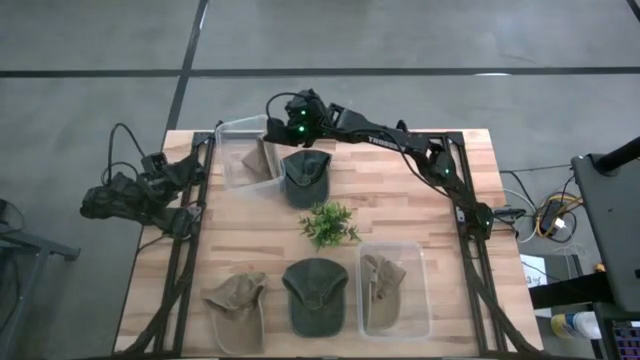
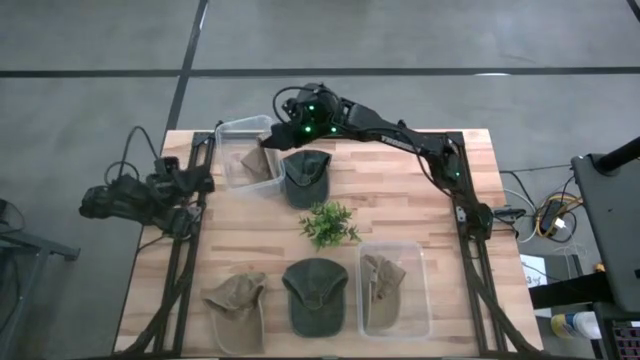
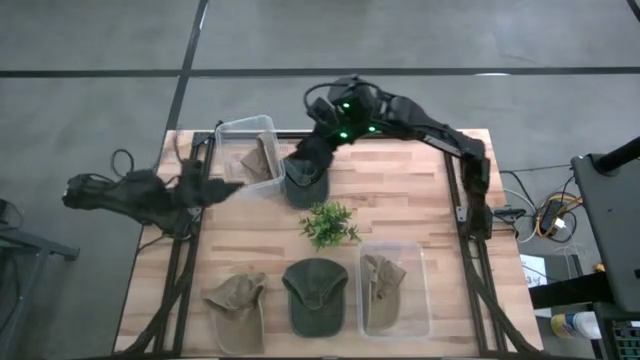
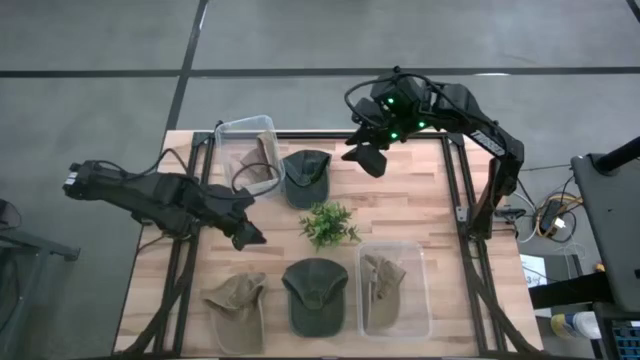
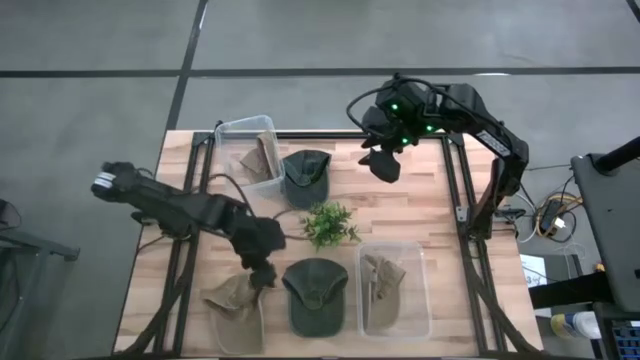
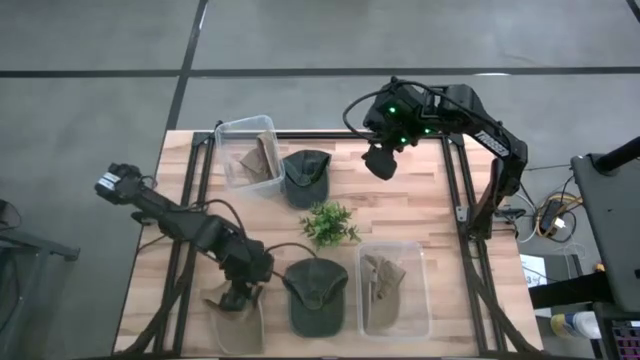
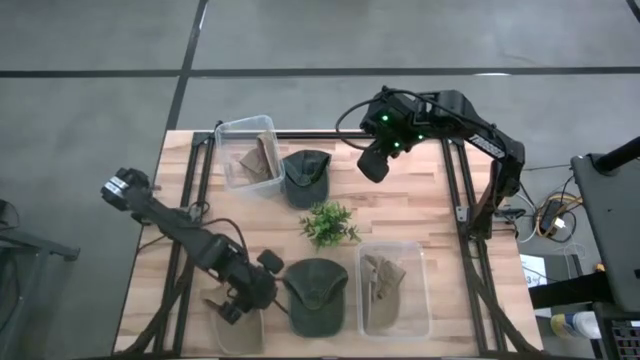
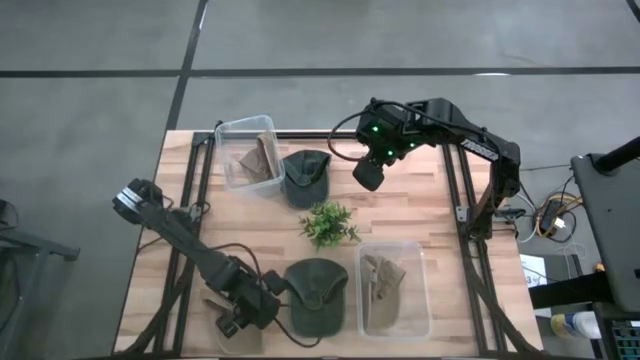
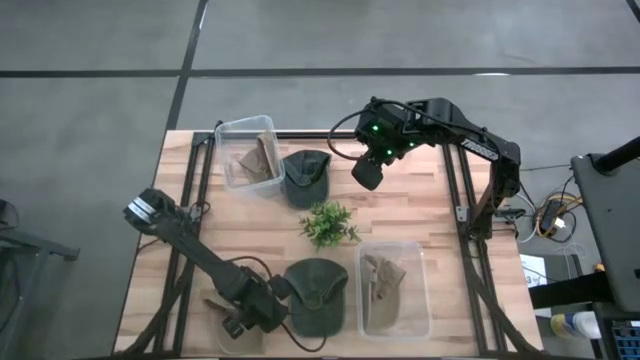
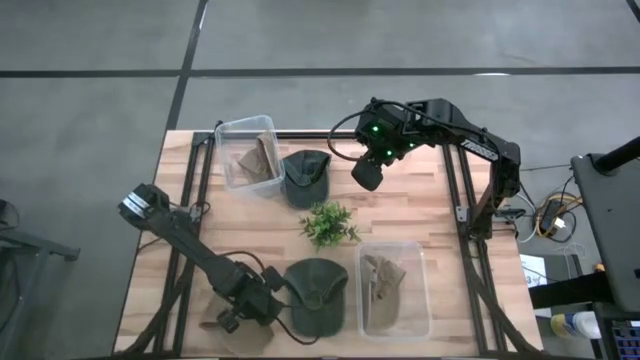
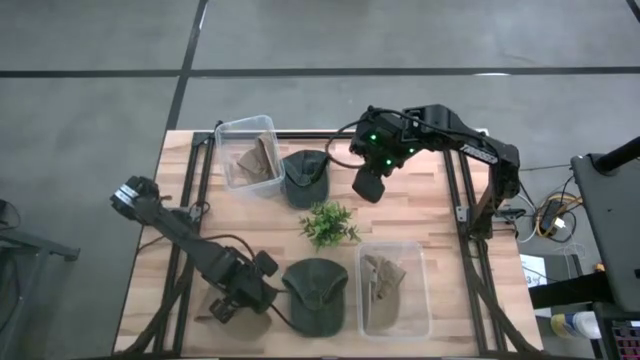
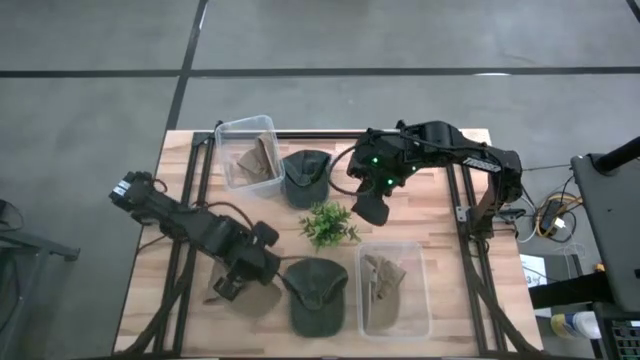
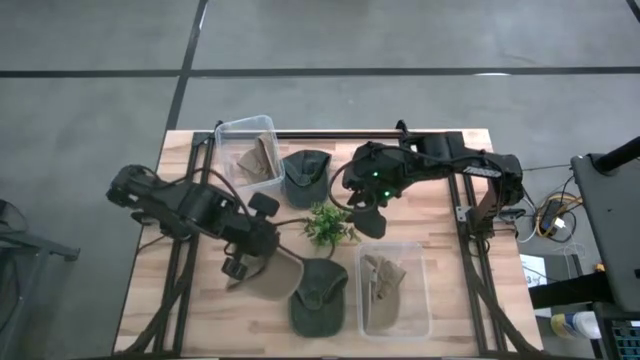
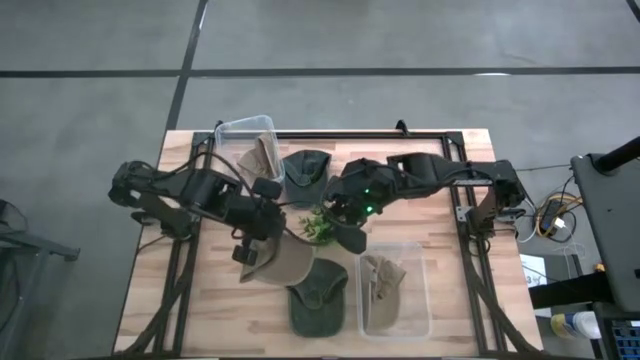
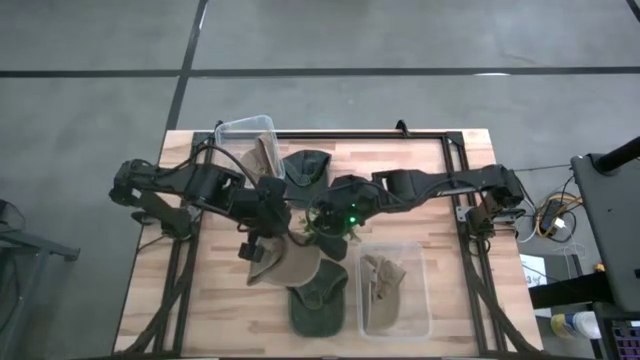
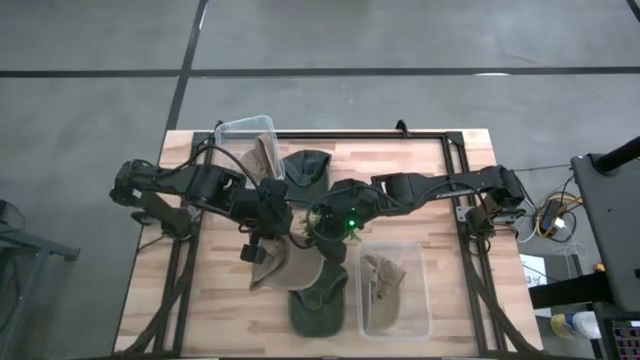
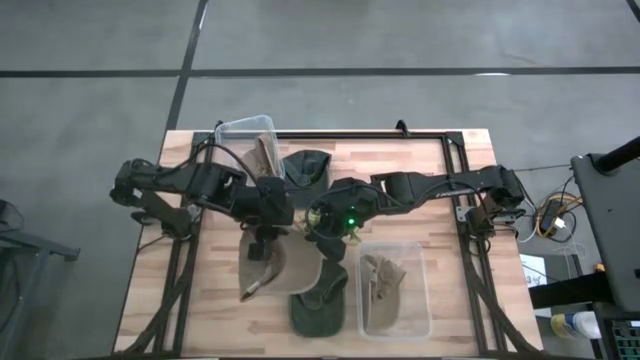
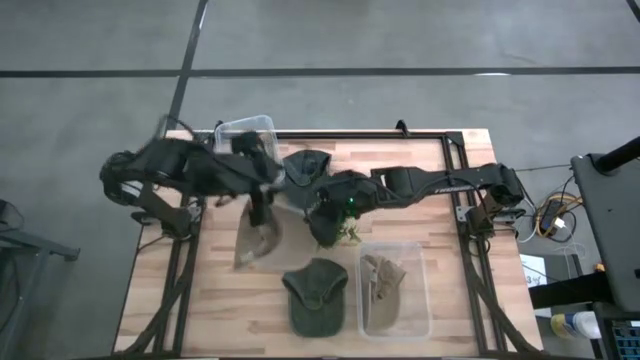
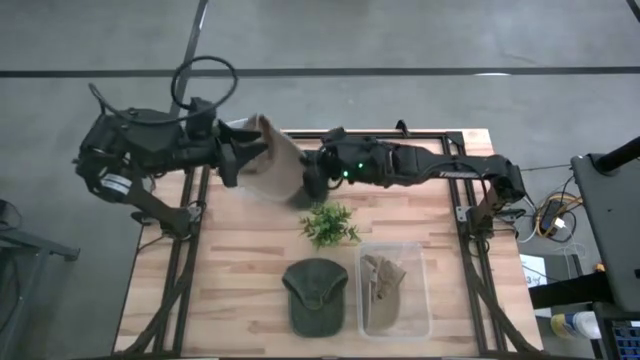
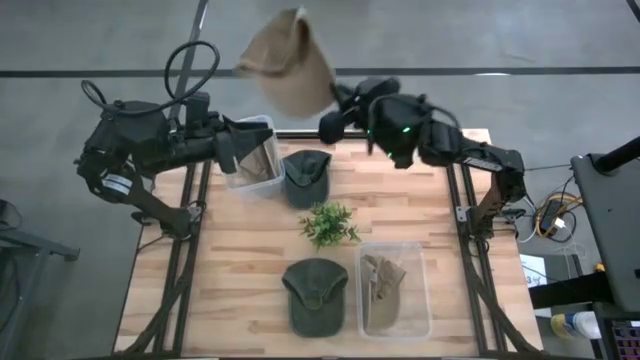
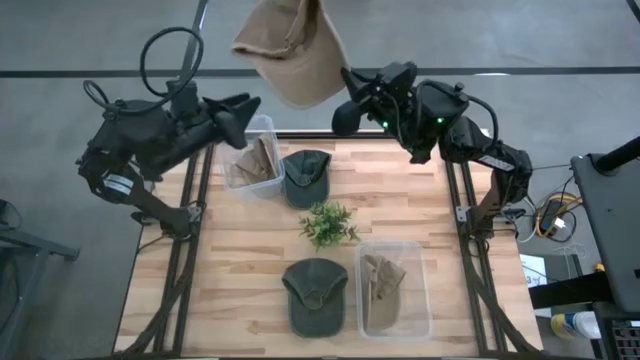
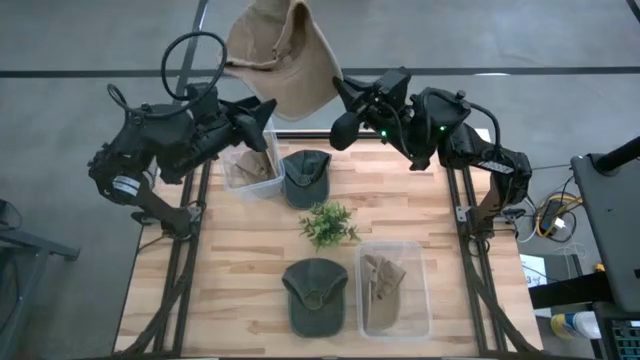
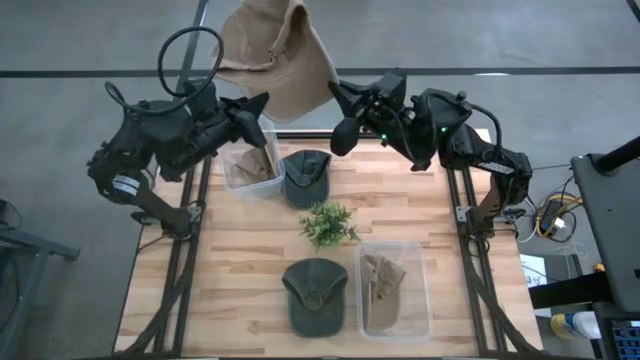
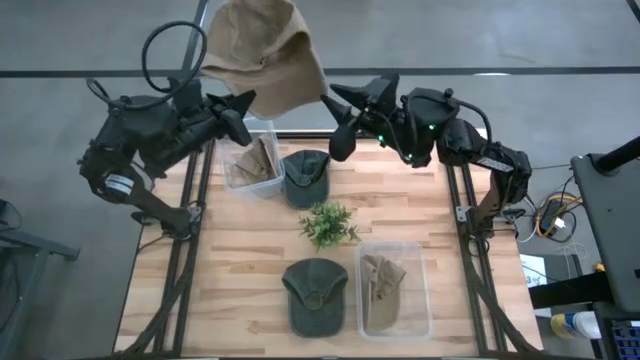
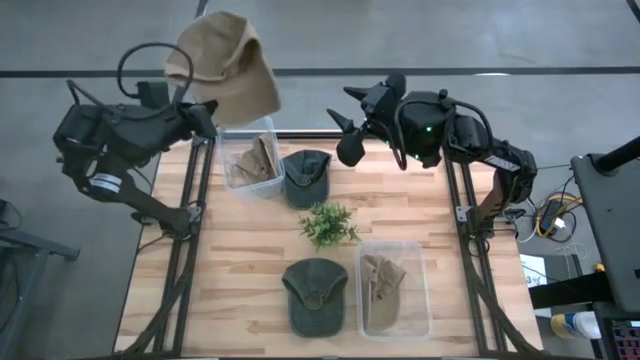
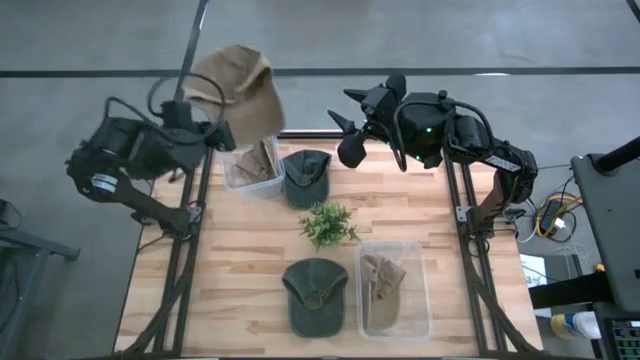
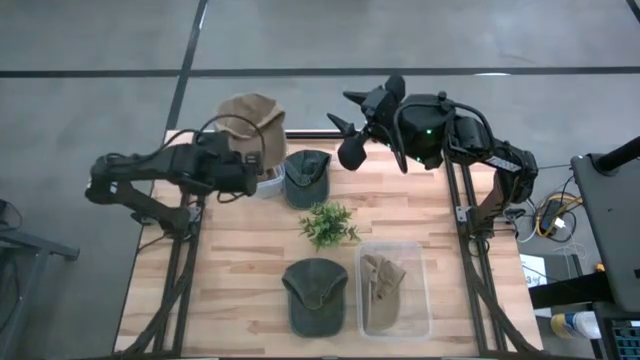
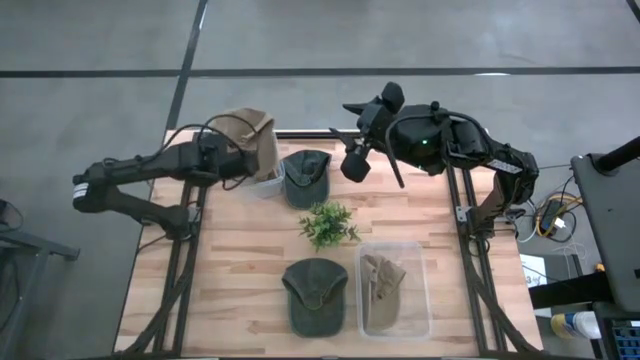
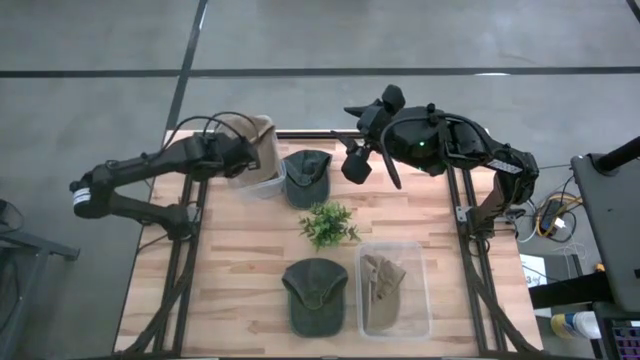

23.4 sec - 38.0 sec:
Task: Pick & Place hat
Put the brown cap into the top transparent bin

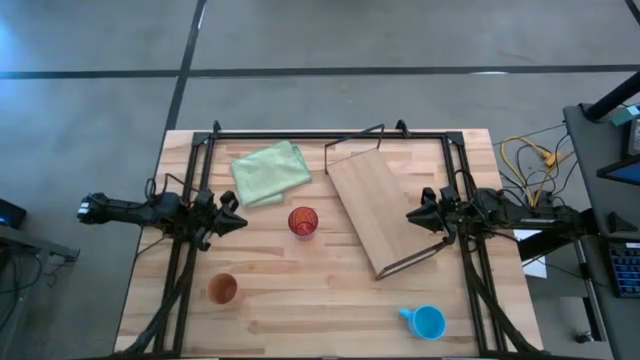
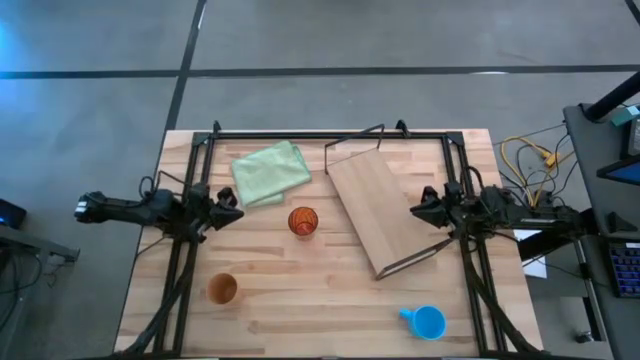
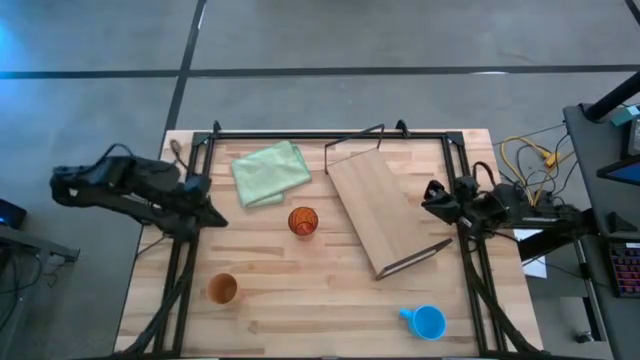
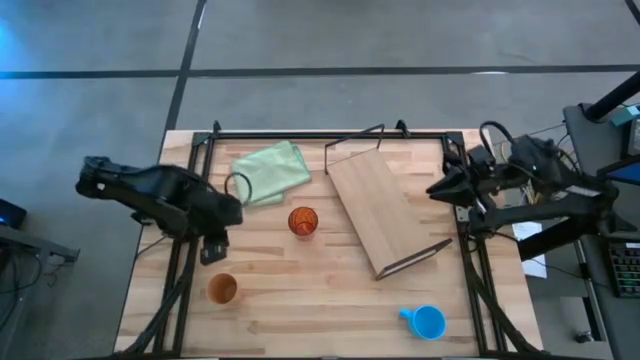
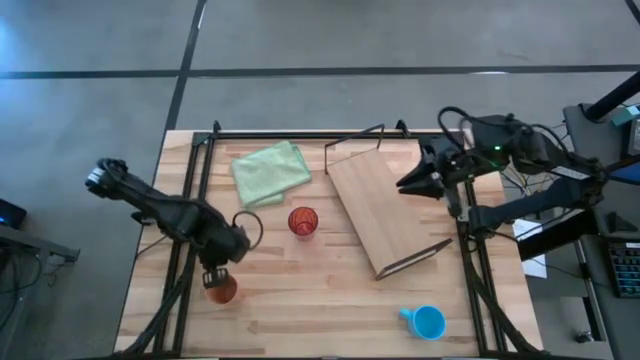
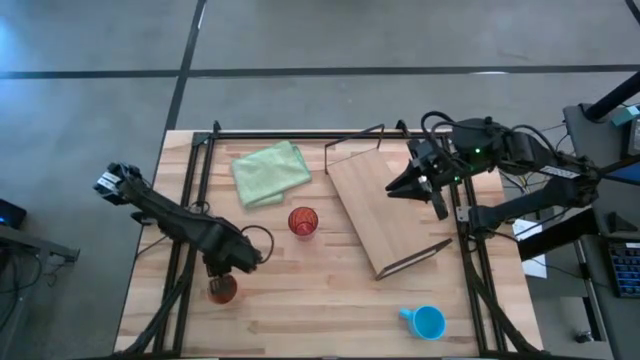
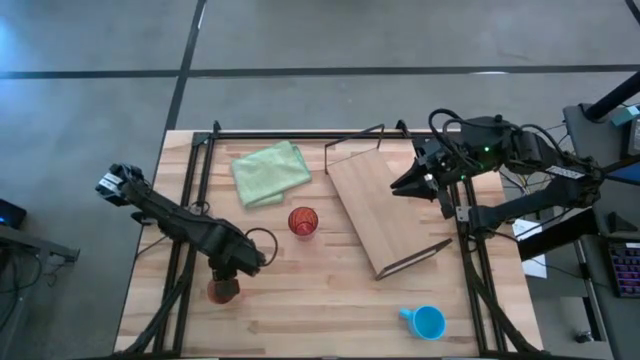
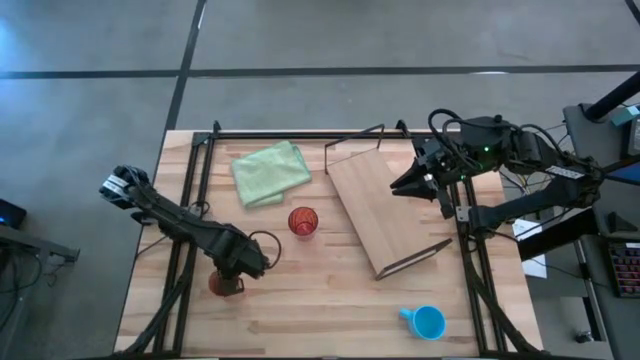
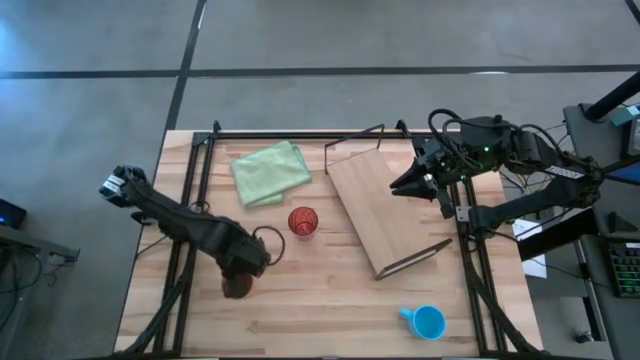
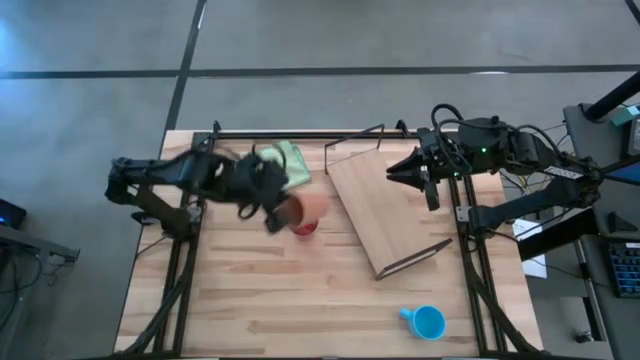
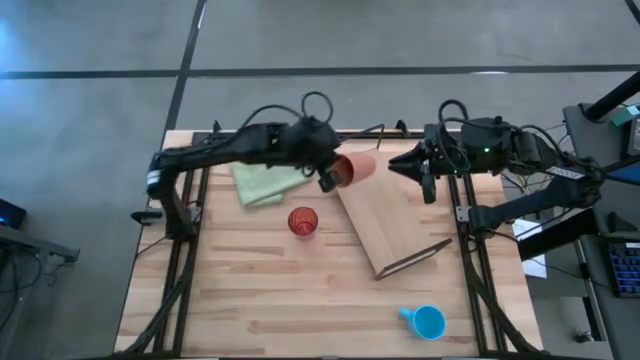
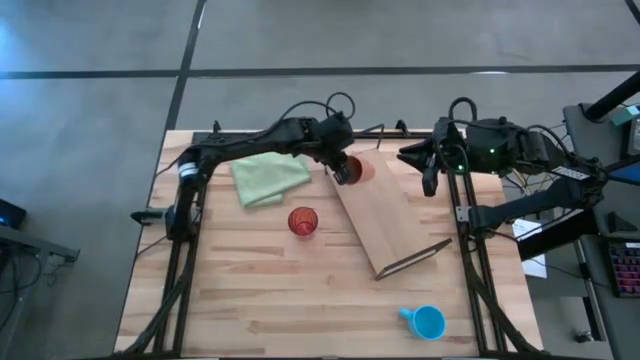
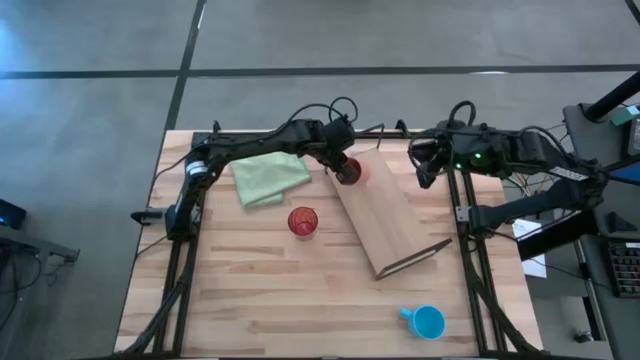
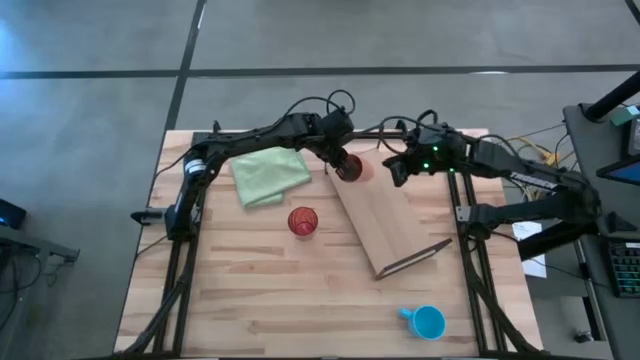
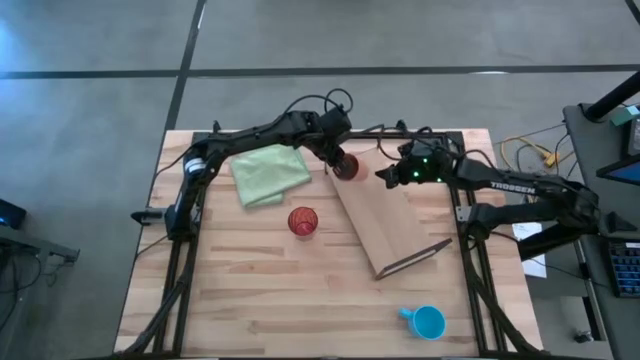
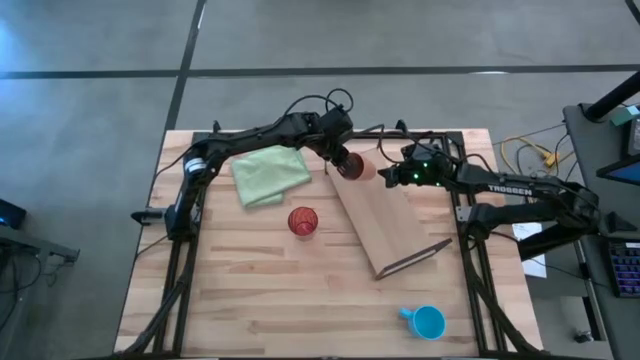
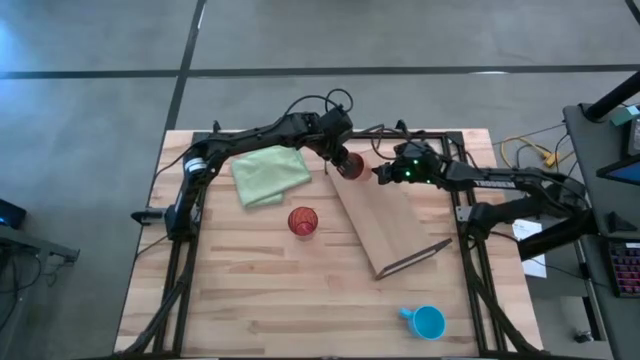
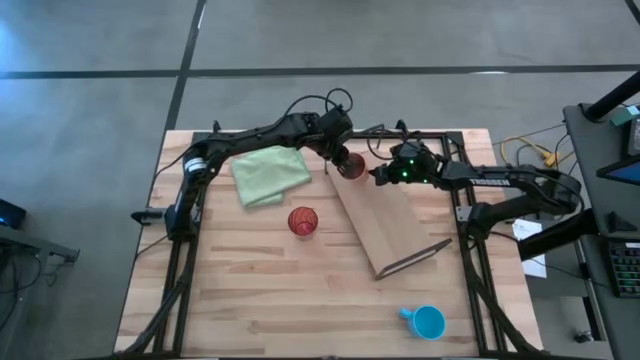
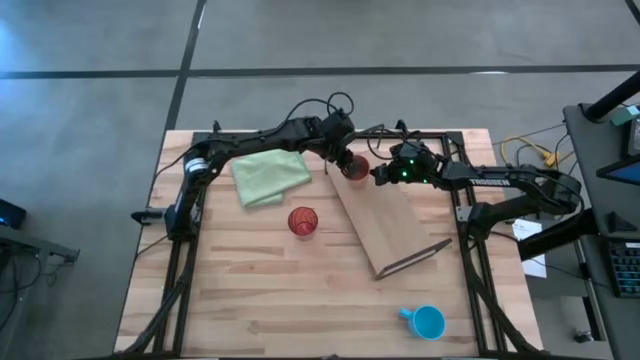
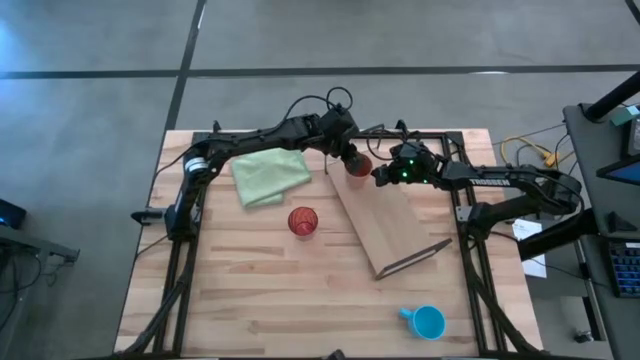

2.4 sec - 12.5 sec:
Task: Stack small to large cups/mugs on shelf
Put the light orange cup on the shelf
